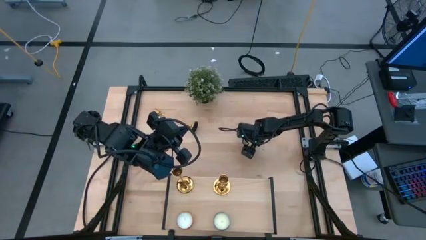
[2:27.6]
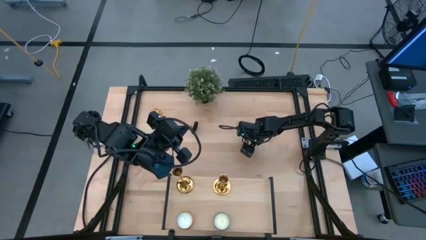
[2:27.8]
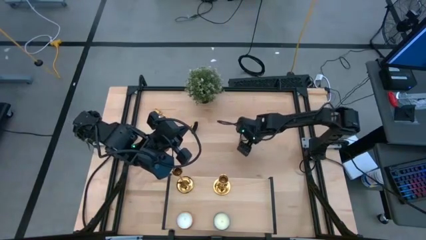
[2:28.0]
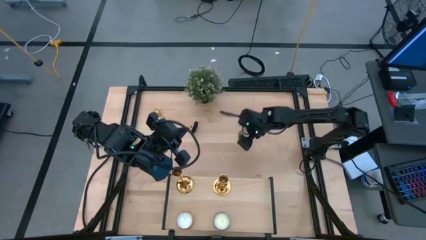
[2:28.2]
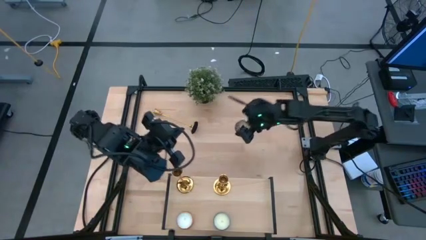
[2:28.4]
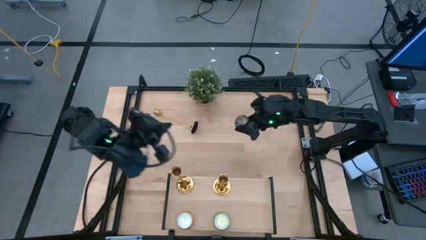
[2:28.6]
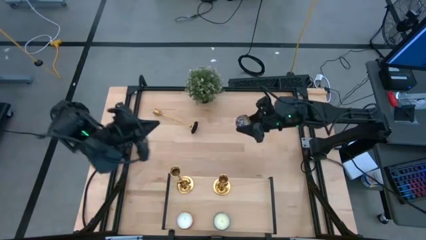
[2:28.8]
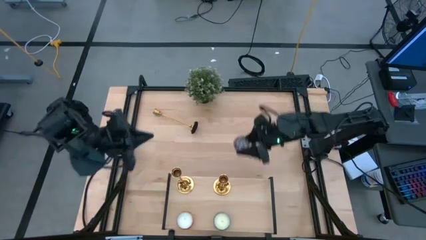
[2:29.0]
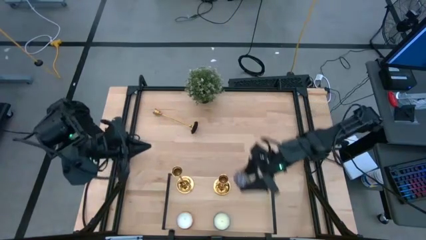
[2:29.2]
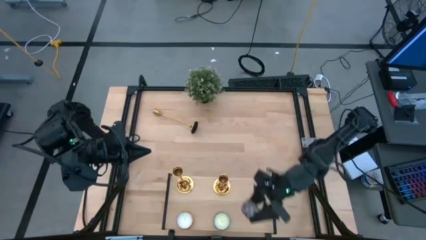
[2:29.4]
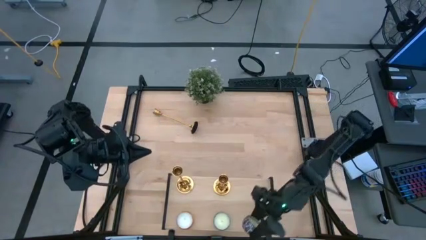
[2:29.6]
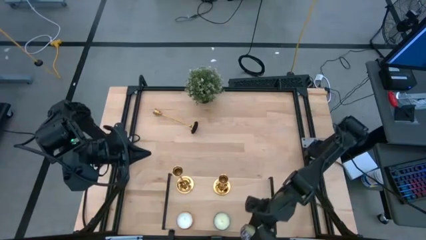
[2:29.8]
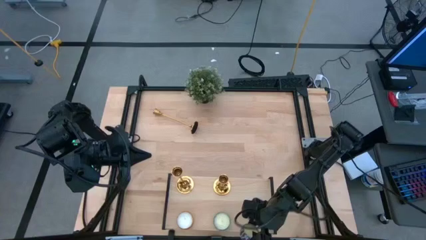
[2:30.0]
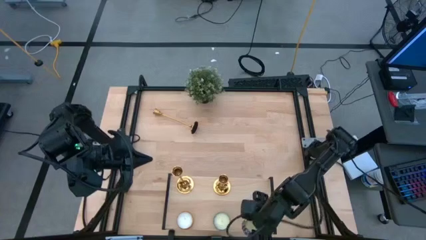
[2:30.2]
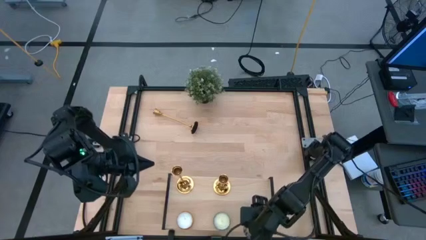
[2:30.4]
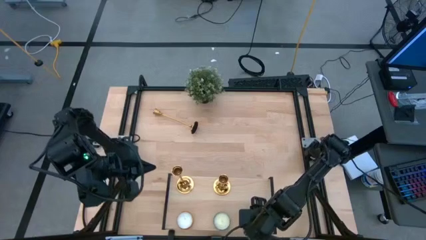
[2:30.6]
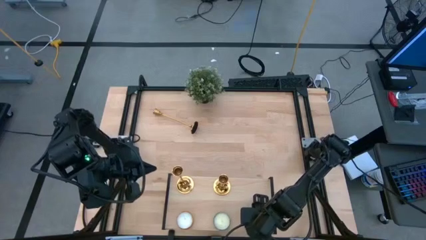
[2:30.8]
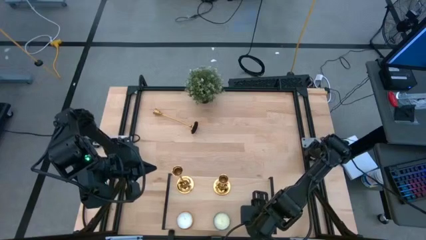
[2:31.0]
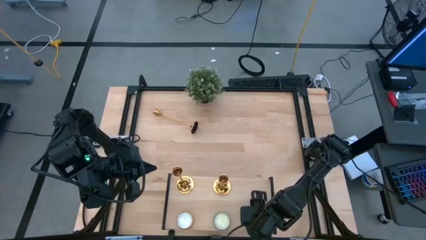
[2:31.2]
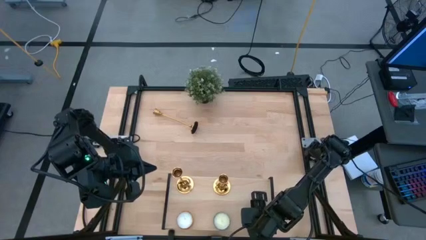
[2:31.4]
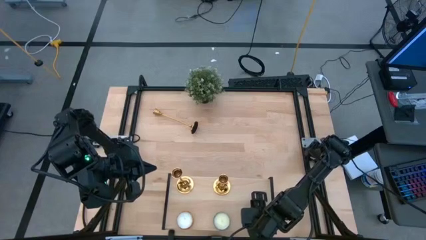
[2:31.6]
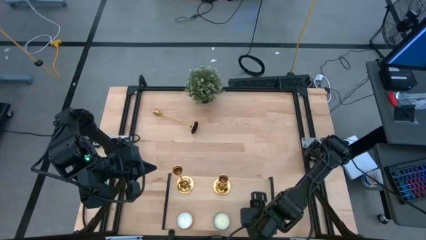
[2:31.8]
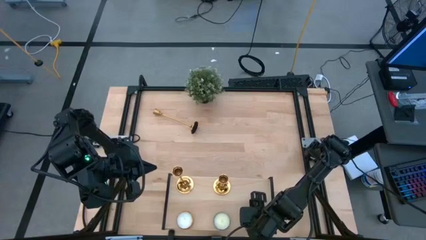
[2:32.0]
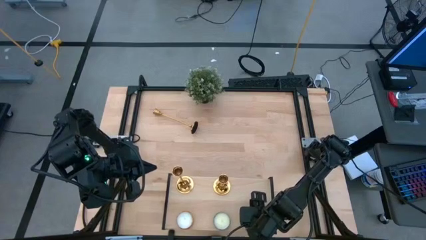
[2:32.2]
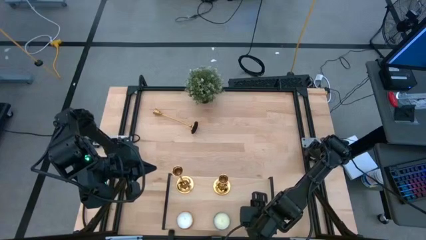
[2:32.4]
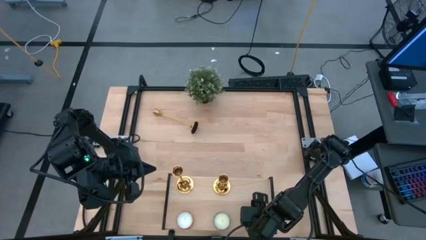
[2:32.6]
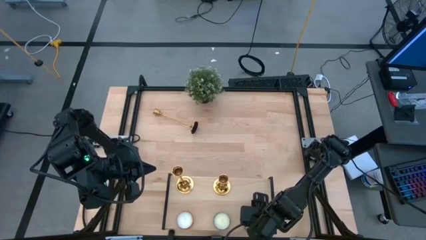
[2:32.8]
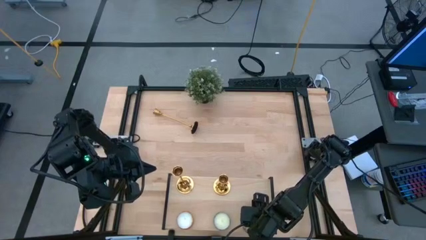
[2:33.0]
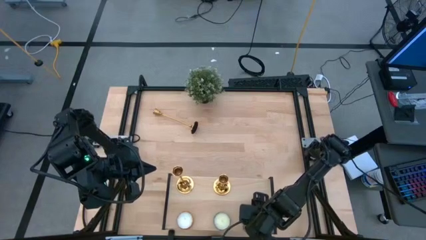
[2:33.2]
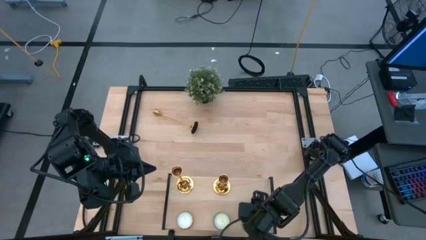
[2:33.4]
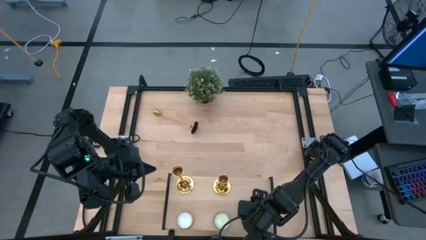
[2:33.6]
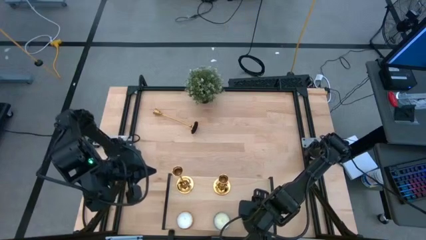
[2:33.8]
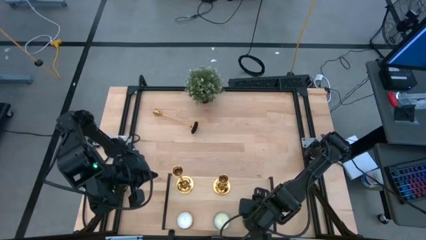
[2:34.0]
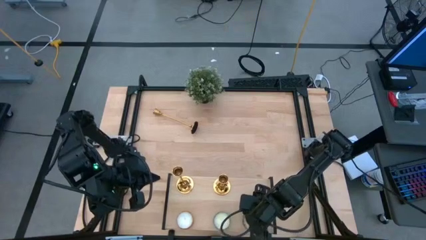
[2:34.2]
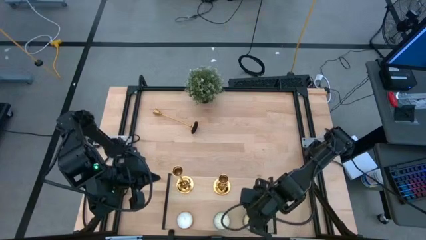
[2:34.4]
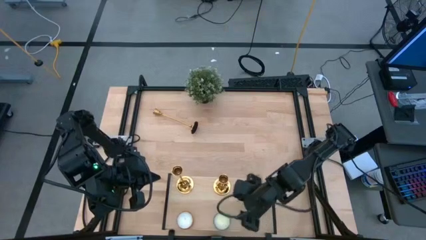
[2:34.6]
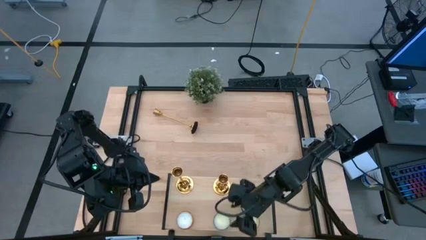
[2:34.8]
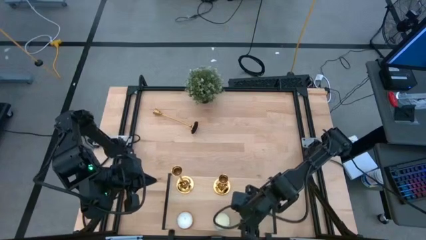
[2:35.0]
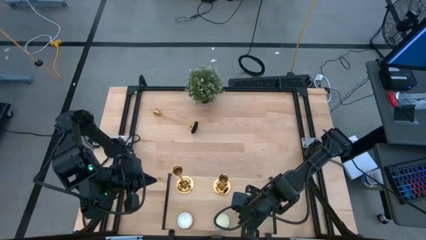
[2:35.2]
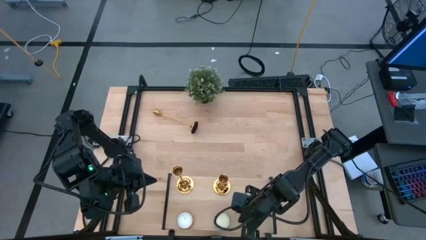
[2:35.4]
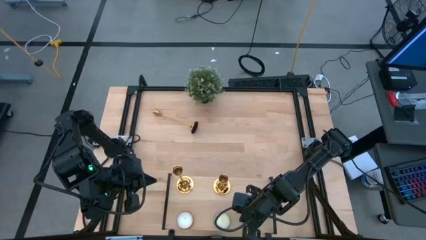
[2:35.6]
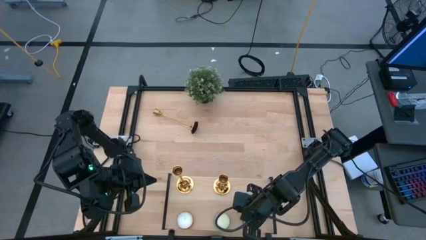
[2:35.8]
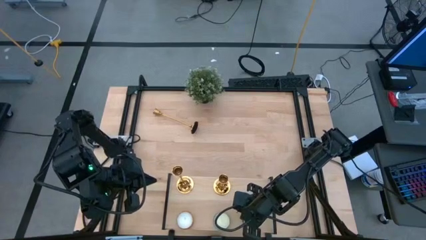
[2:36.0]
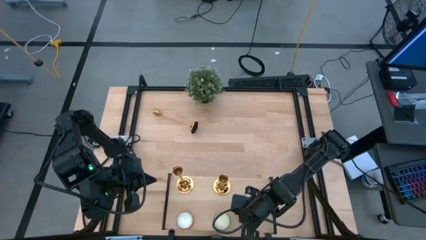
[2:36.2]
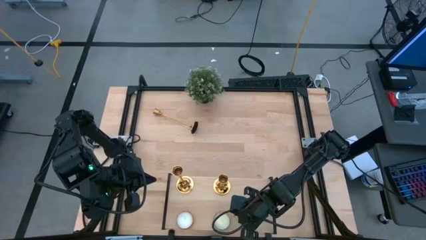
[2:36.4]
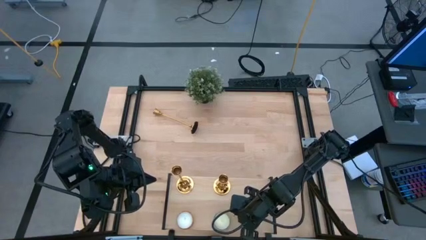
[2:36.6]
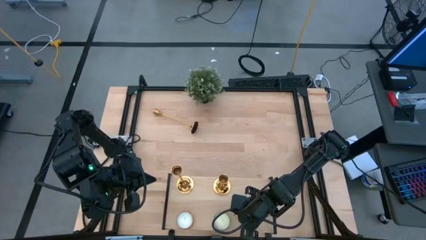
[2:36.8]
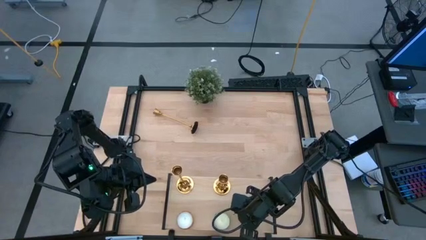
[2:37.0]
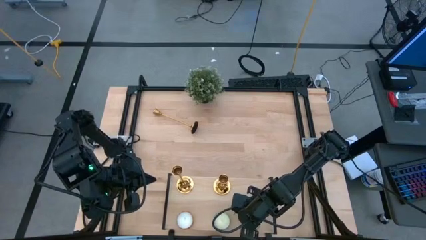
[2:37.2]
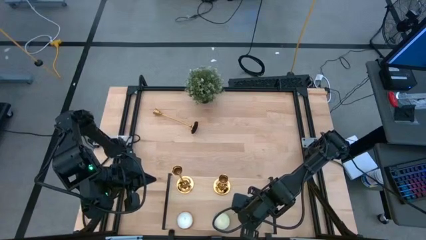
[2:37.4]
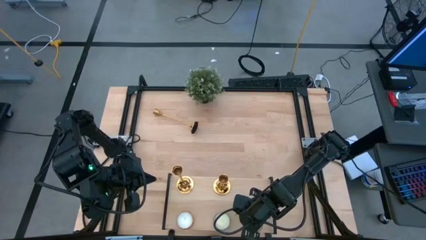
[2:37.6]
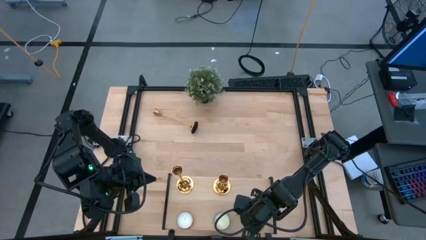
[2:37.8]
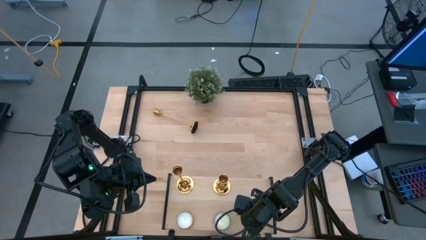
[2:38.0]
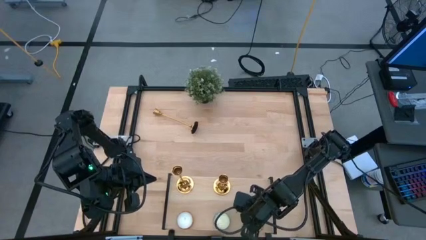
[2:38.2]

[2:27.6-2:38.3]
Task: Pick & Place candle stick holders
Put the red scented candle on the shelf

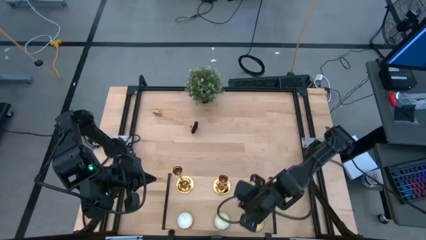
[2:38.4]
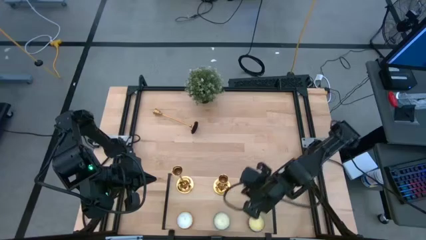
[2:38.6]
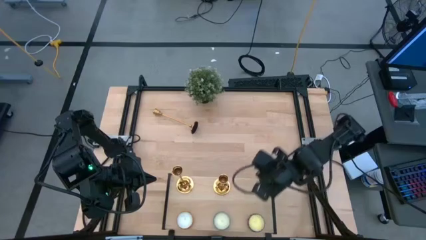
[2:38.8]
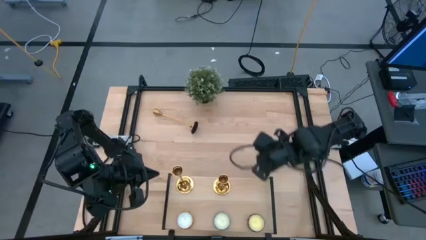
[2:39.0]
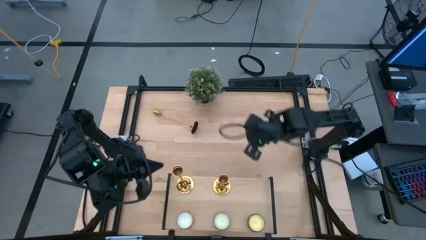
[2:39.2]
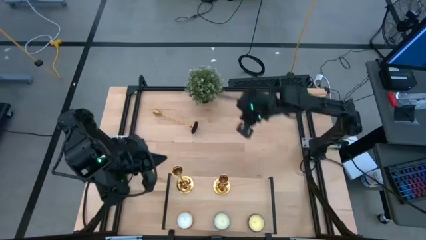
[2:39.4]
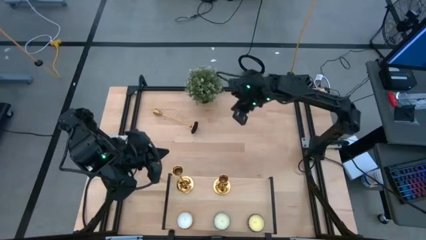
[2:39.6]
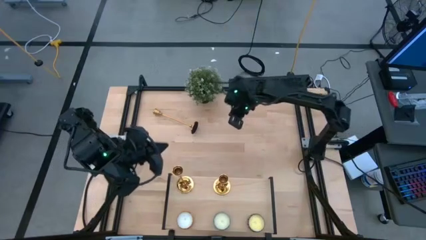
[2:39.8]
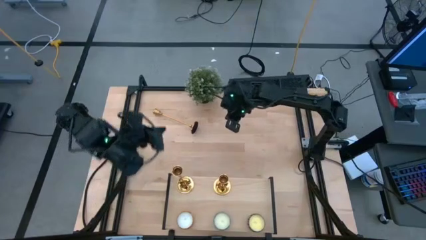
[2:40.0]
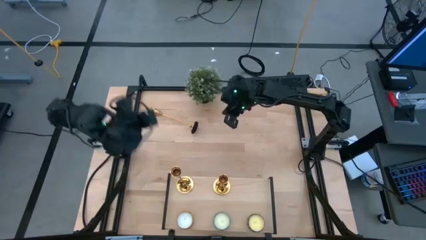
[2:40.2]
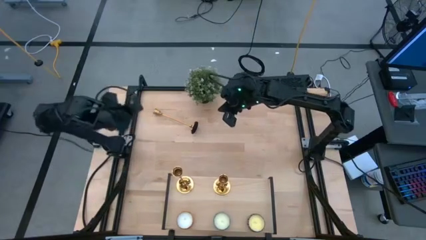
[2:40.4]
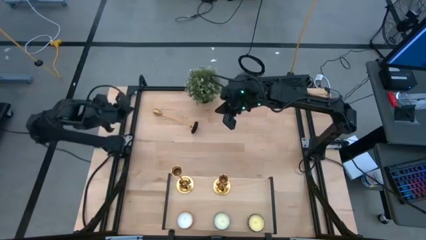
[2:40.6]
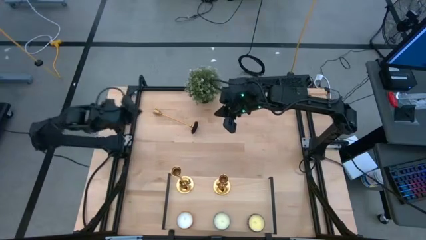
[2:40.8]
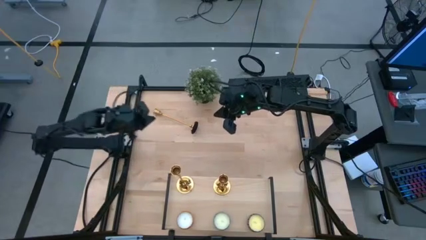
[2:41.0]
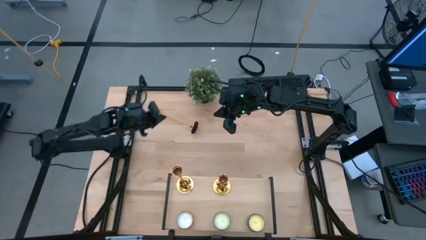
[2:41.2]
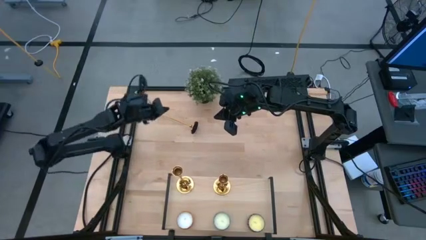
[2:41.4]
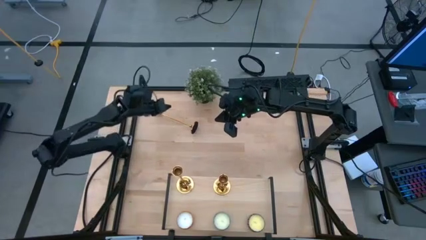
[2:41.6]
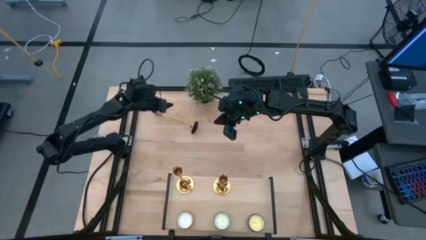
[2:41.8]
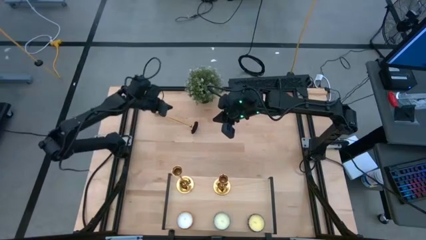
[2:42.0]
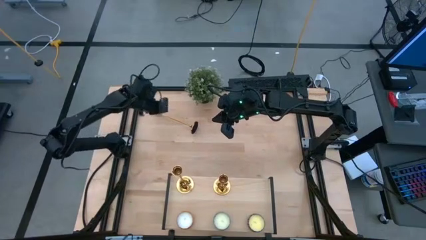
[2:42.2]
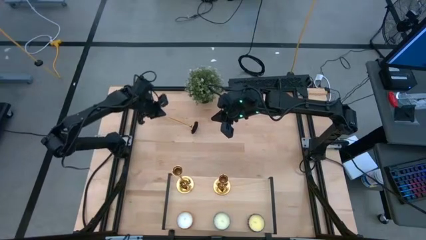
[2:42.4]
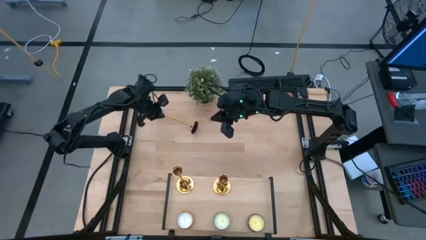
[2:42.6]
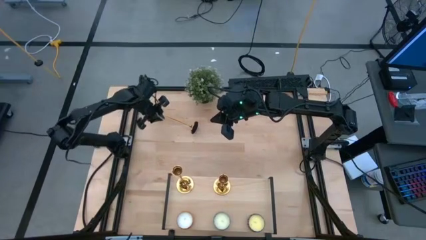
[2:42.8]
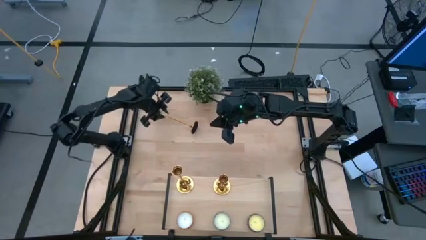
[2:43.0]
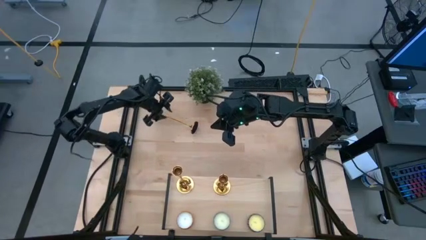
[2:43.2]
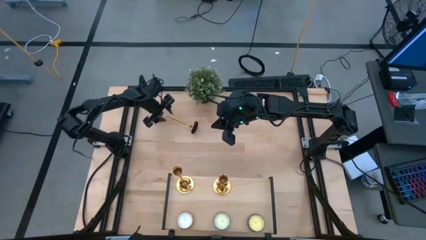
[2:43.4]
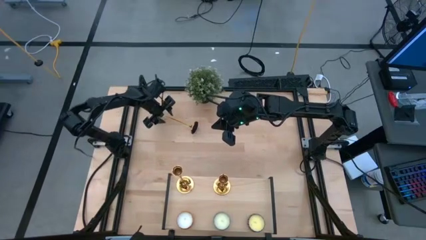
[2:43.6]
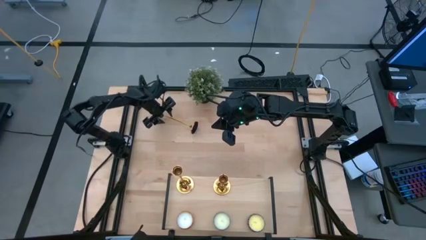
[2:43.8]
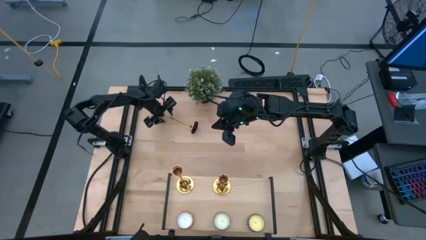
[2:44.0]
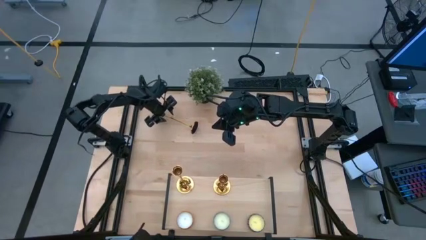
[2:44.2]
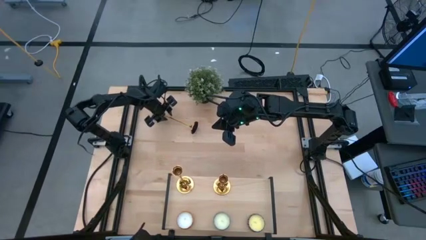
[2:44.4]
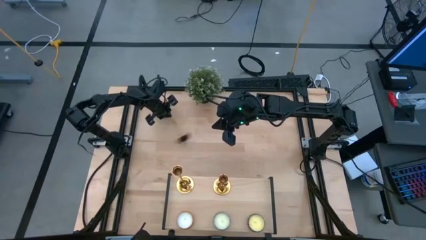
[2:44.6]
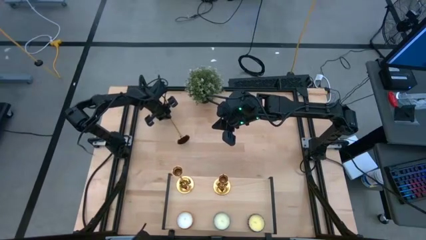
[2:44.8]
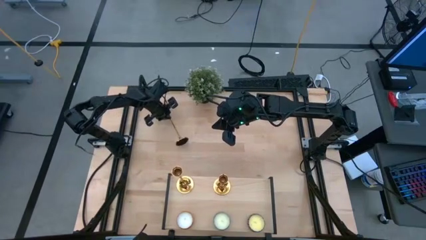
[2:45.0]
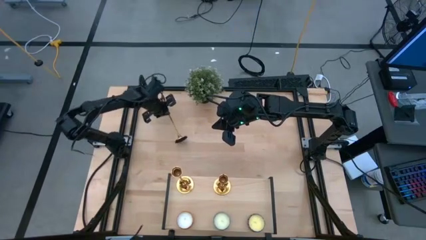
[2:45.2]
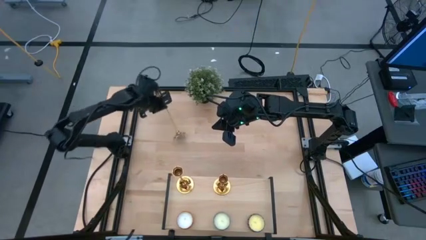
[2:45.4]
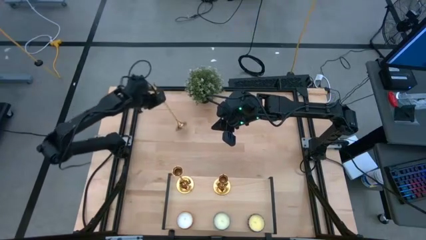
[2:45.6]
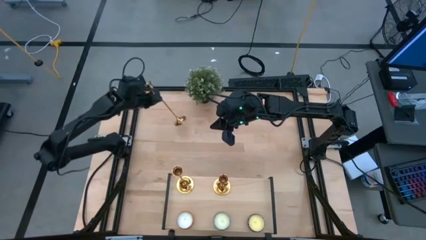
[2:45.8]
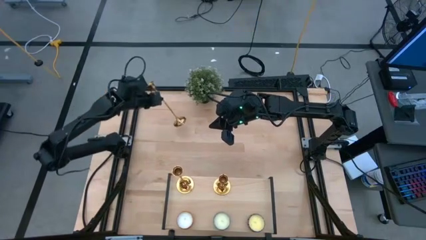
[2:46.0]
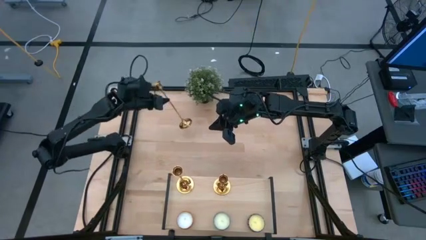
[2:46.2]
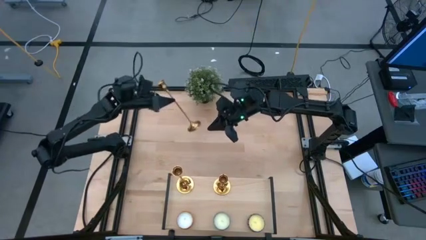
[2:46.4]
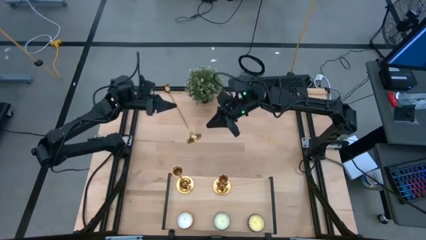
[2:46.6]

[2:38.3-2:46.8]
Put the gold candle stand on the shelf
